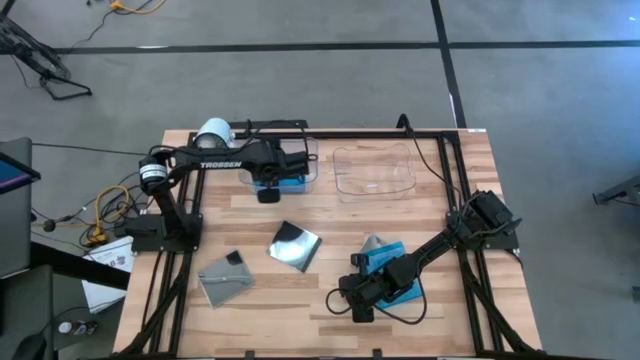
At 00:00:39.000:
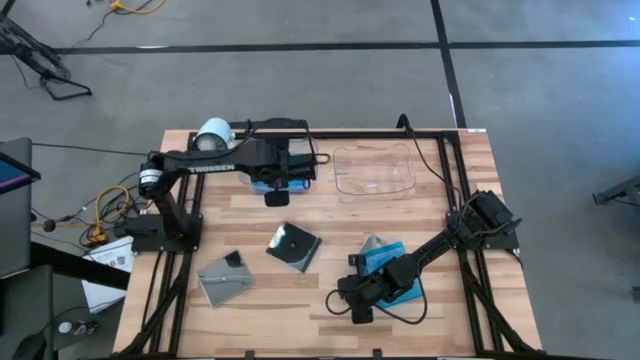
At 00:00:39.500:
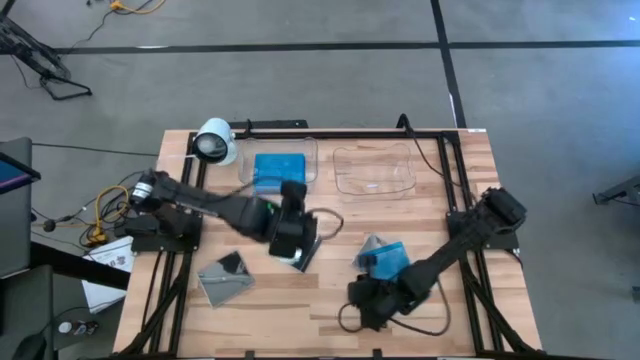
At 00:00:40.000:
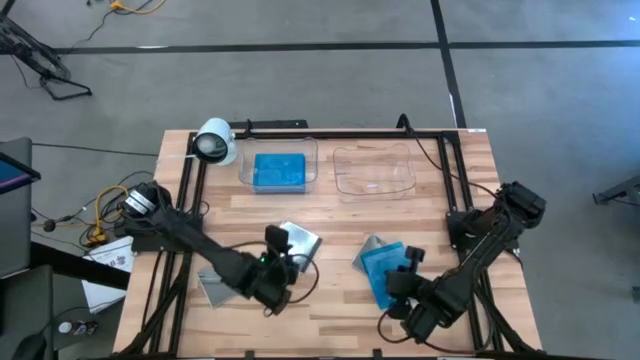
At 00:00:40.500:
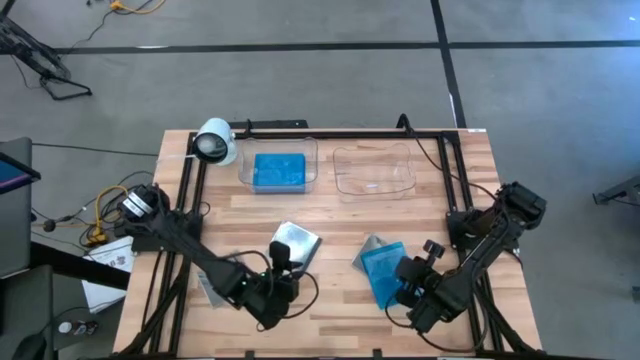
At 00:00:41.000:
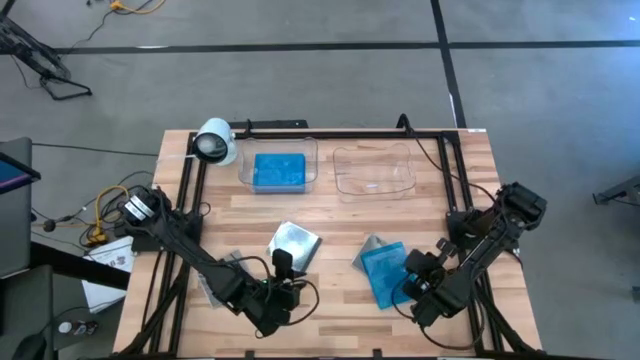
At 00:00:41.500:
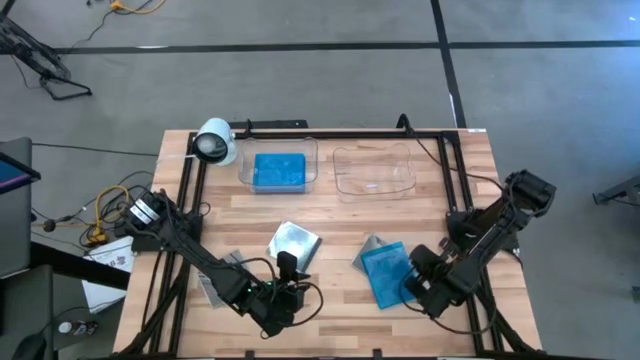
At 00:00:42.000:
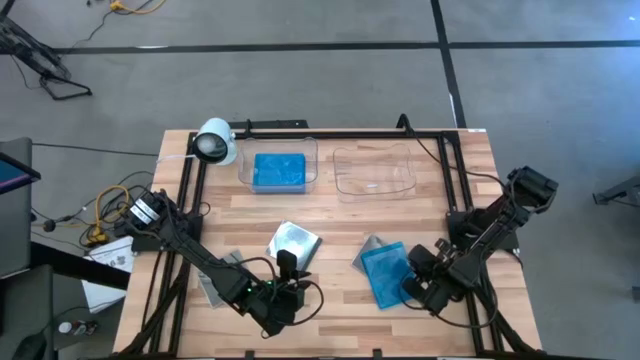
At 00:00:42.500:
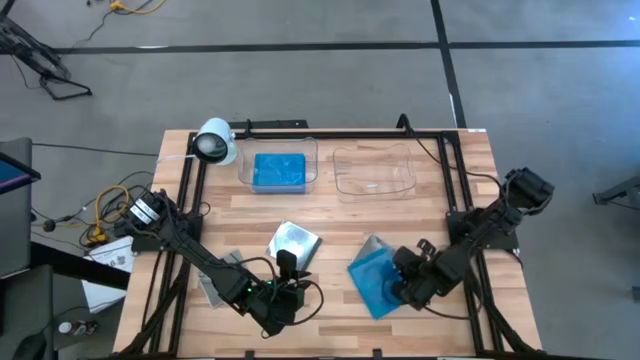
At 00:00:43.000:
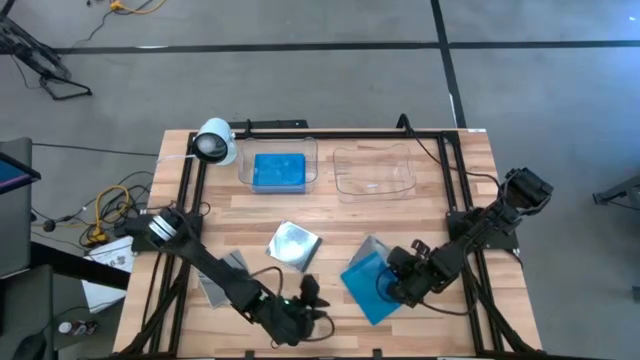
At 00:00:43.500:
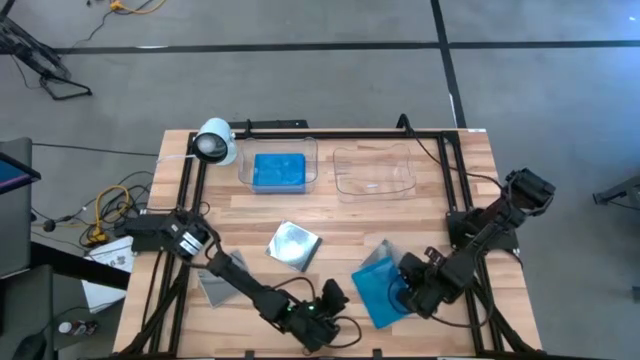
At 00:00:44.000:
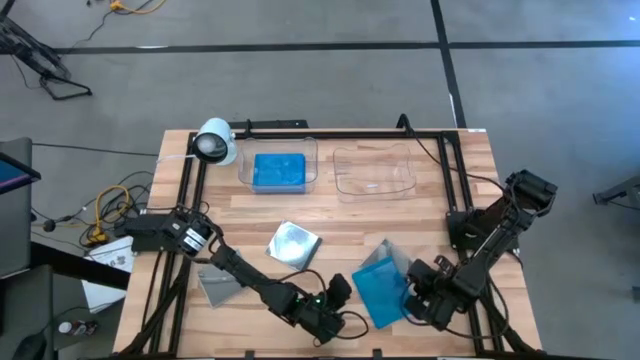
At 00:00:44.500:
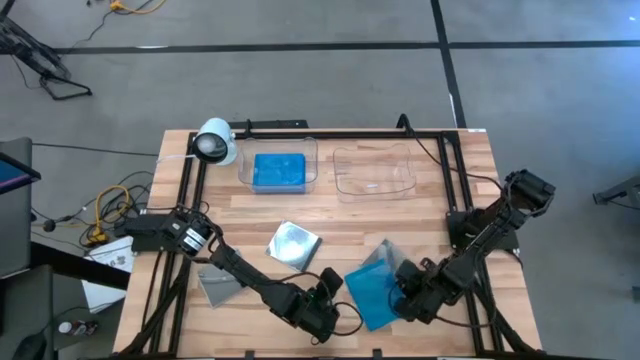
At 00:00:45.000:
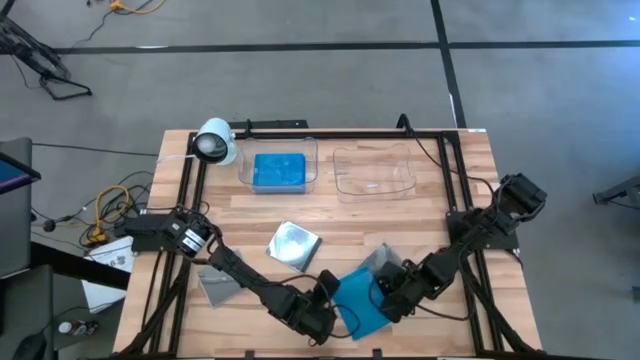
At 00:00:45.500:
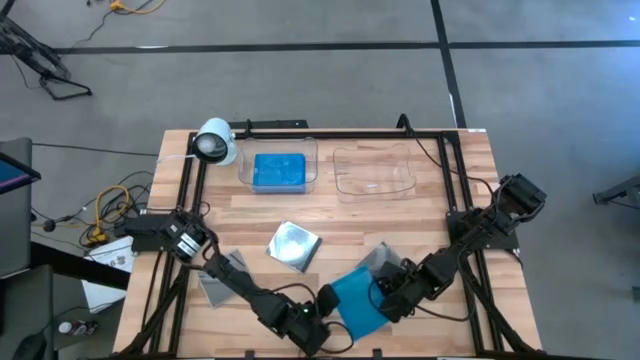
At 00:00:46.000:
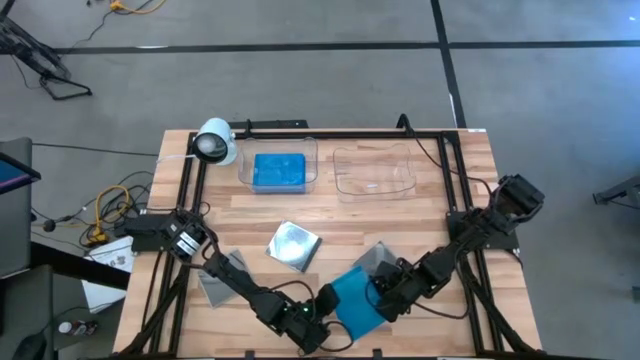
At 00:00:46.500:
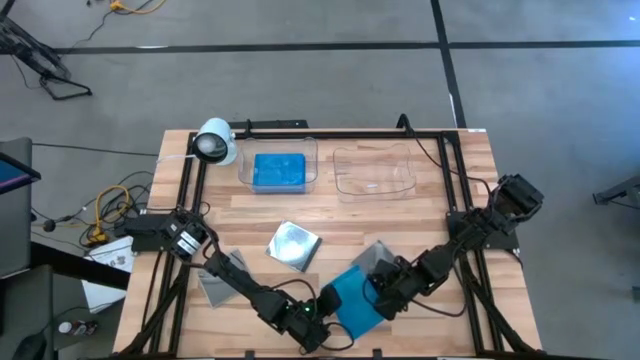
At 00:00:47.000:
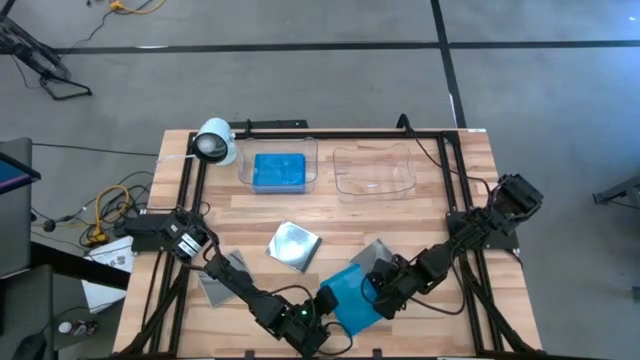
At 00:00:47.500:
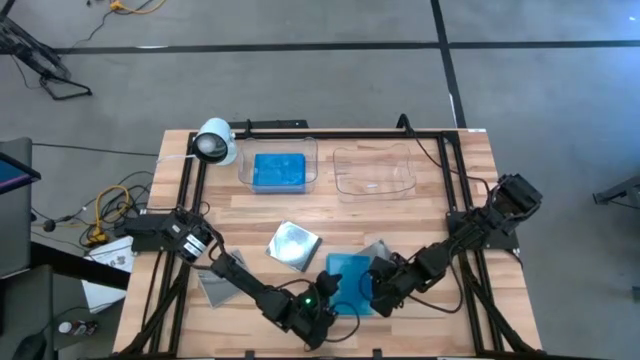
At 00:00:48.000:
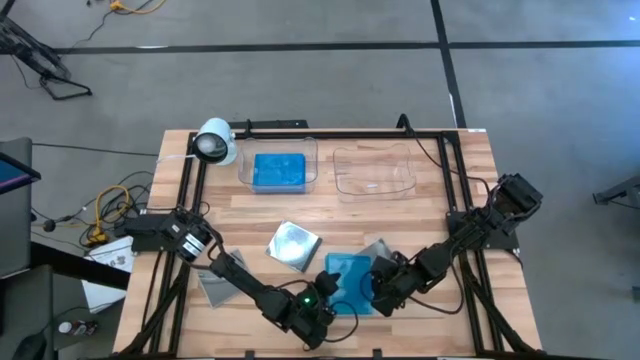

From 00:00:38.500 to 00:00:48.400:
Task: Pick & place jewel cases by type
Put the blue cd case into the left transparent bin
